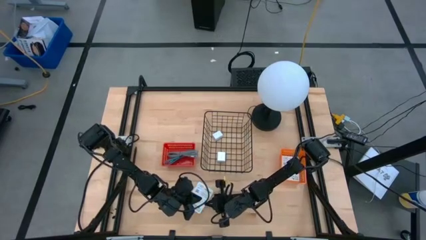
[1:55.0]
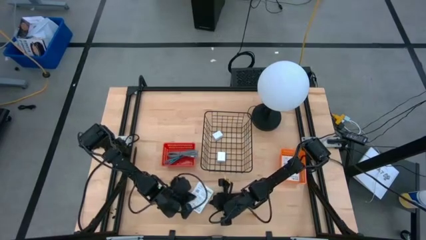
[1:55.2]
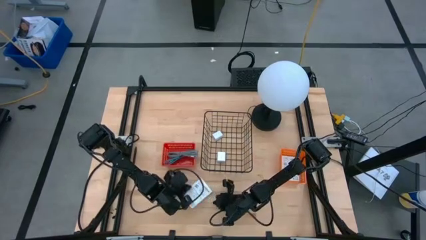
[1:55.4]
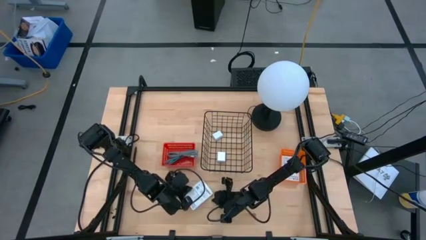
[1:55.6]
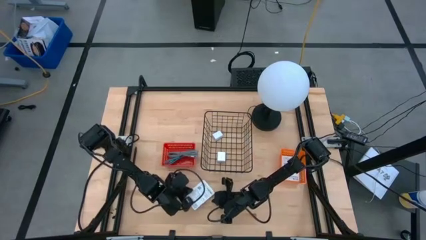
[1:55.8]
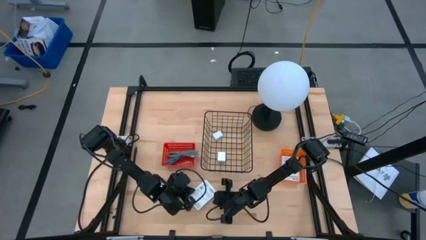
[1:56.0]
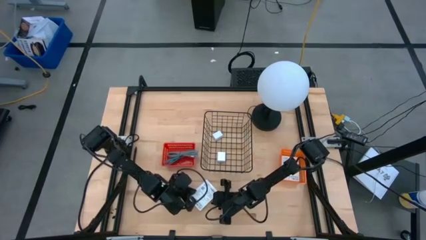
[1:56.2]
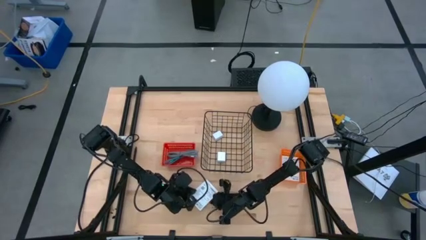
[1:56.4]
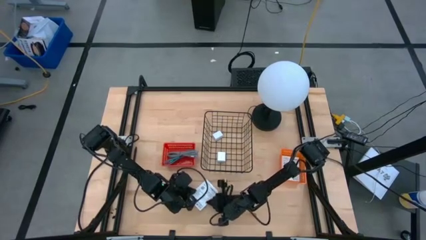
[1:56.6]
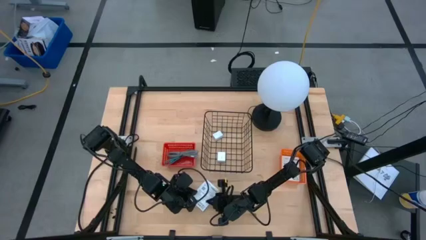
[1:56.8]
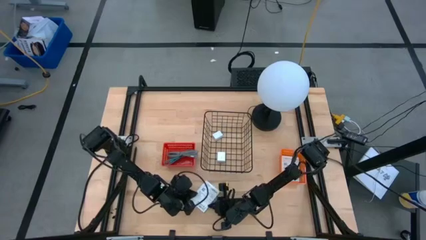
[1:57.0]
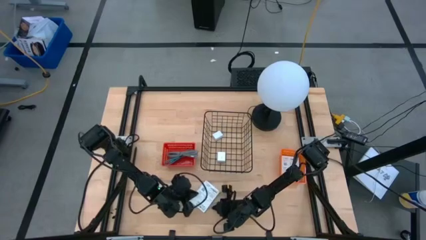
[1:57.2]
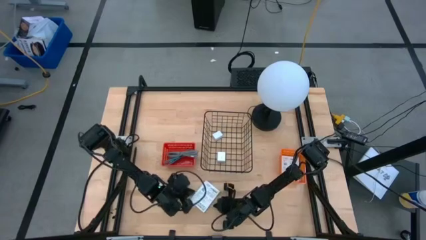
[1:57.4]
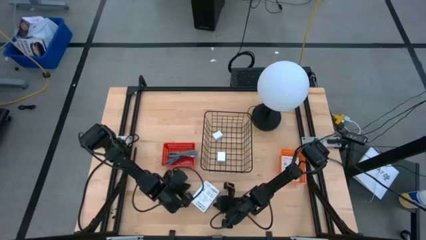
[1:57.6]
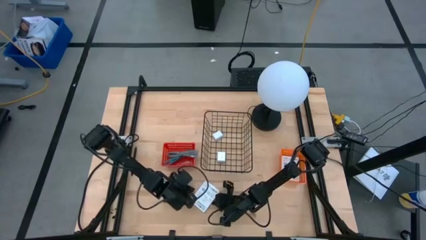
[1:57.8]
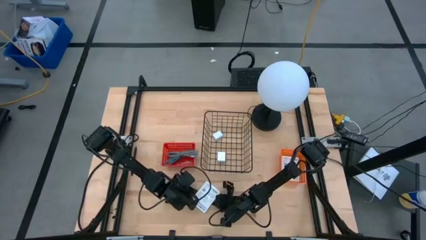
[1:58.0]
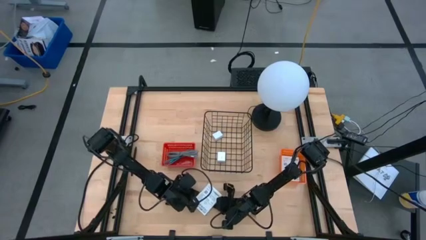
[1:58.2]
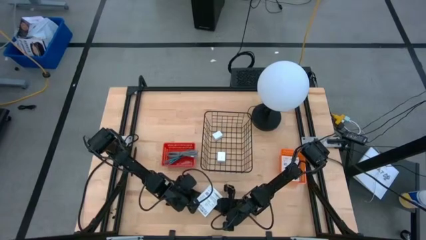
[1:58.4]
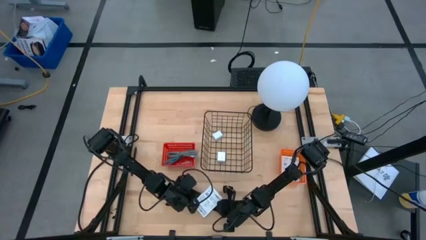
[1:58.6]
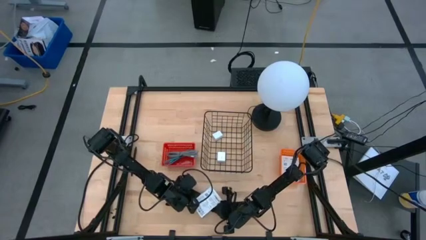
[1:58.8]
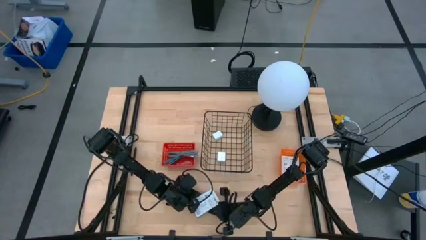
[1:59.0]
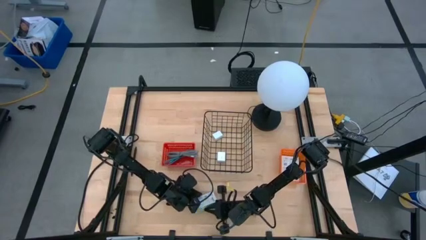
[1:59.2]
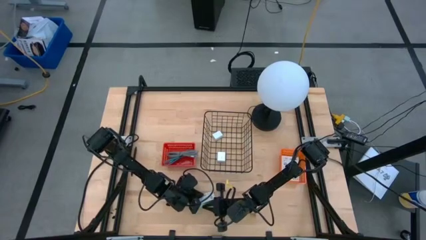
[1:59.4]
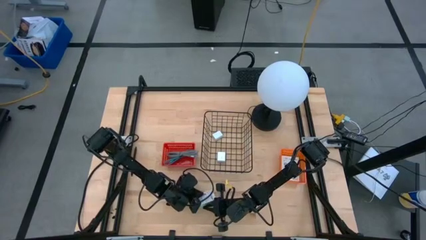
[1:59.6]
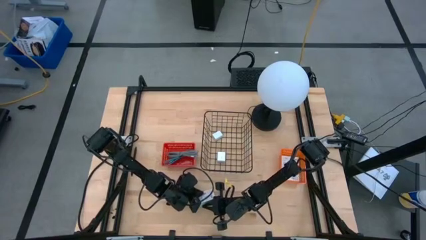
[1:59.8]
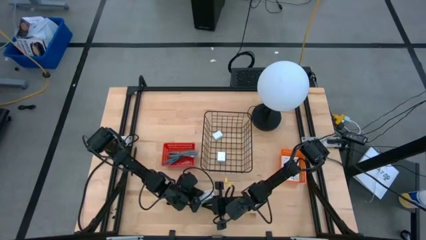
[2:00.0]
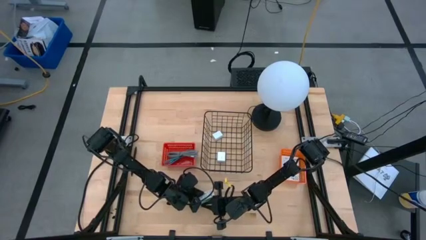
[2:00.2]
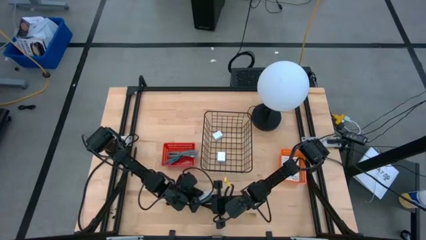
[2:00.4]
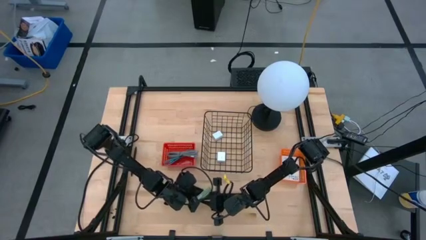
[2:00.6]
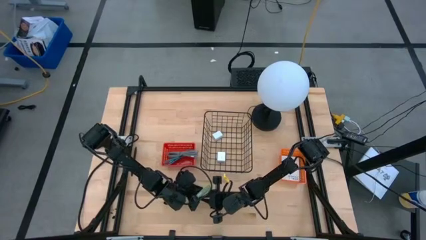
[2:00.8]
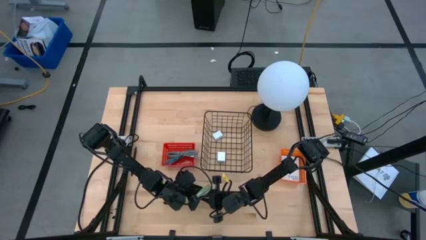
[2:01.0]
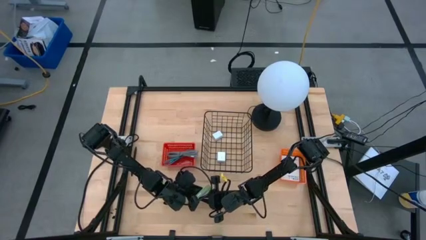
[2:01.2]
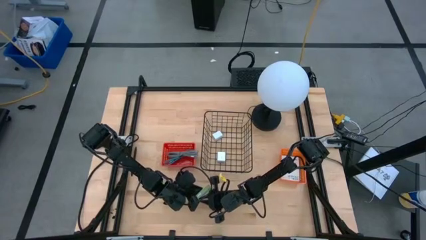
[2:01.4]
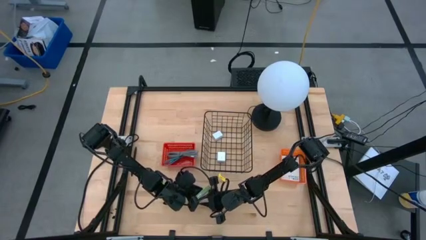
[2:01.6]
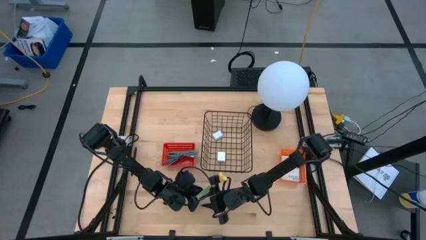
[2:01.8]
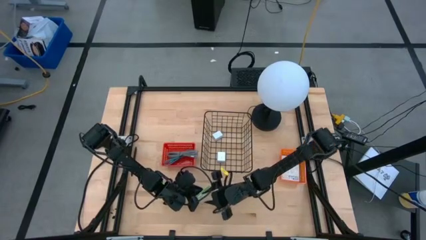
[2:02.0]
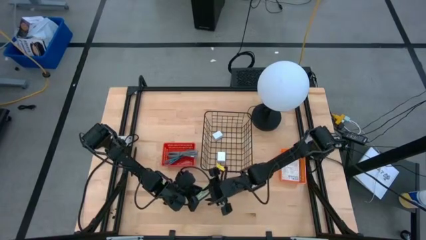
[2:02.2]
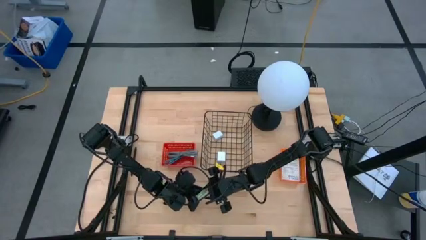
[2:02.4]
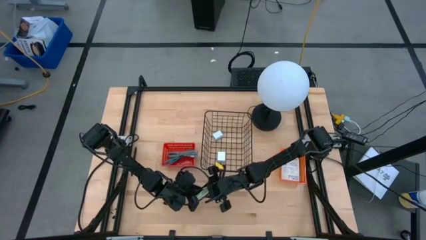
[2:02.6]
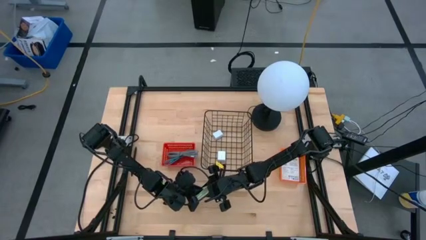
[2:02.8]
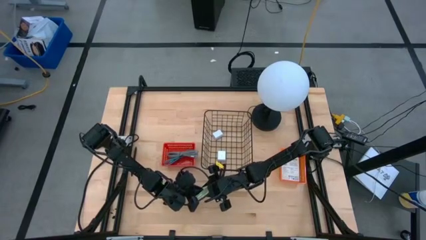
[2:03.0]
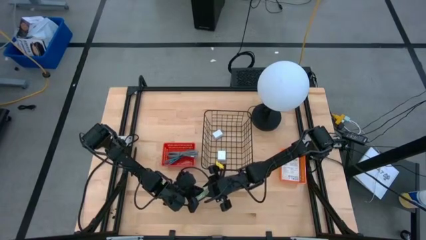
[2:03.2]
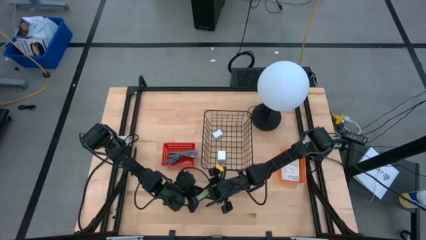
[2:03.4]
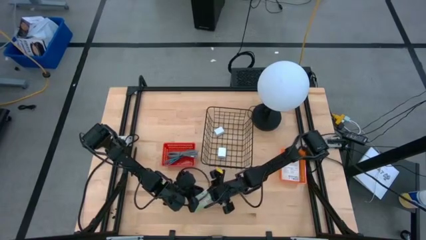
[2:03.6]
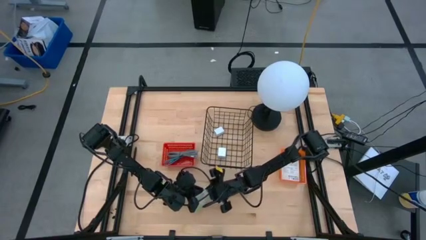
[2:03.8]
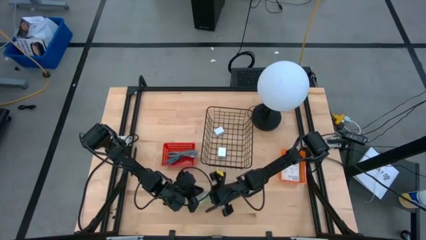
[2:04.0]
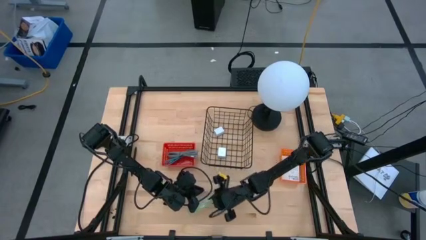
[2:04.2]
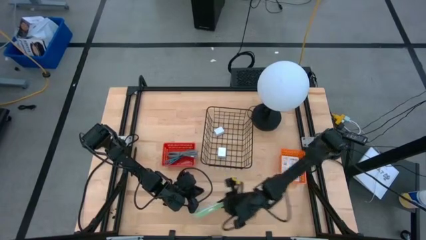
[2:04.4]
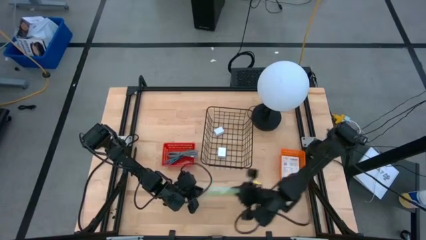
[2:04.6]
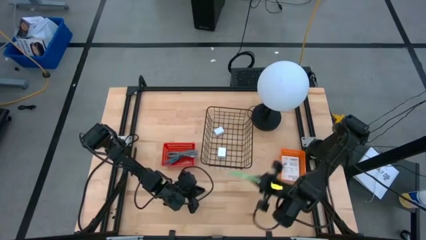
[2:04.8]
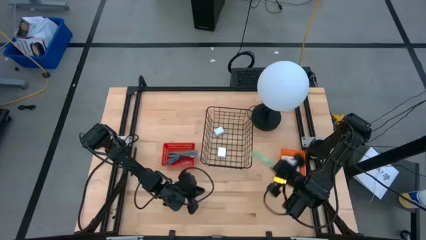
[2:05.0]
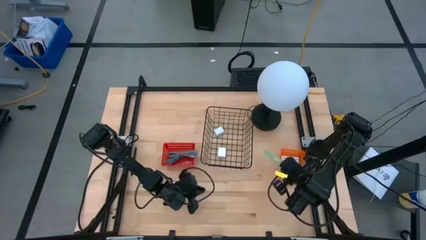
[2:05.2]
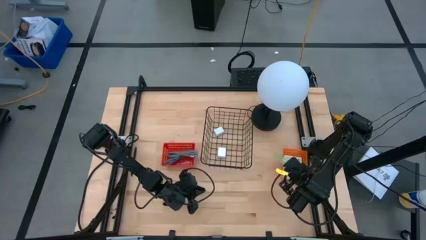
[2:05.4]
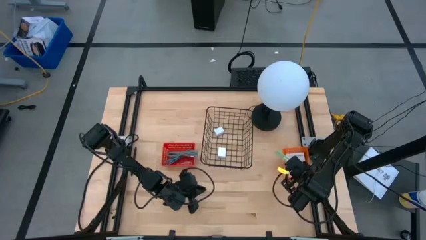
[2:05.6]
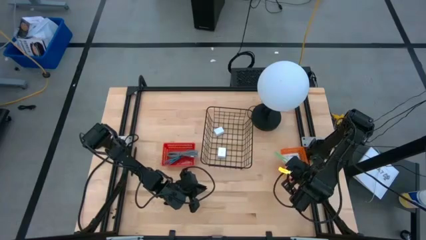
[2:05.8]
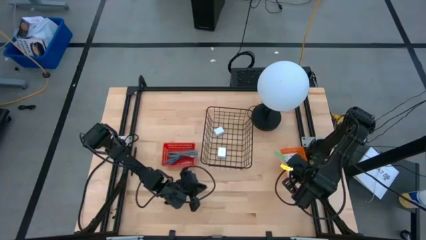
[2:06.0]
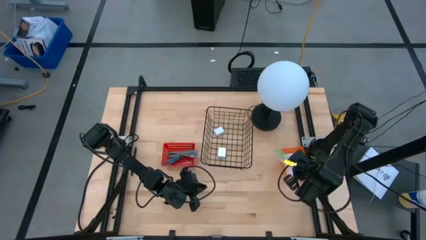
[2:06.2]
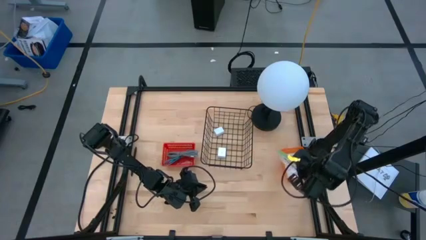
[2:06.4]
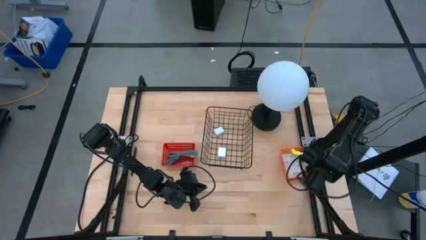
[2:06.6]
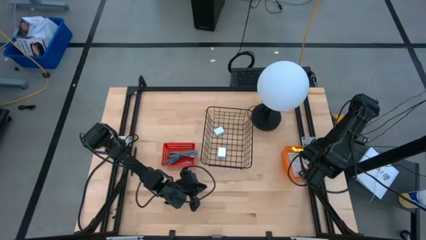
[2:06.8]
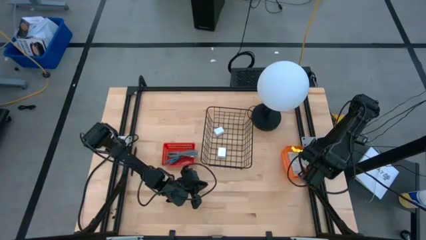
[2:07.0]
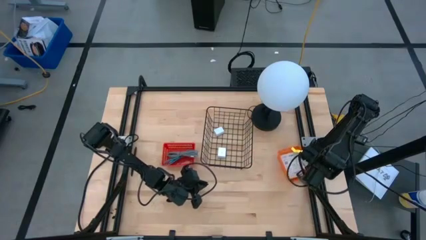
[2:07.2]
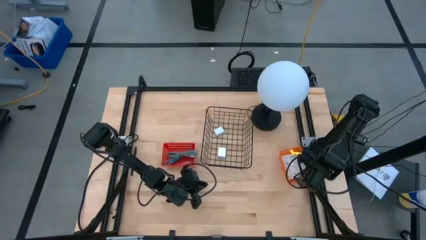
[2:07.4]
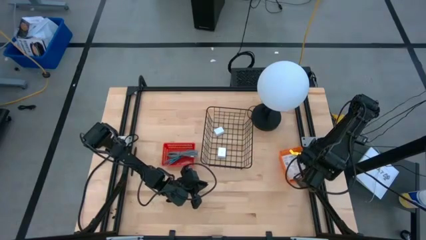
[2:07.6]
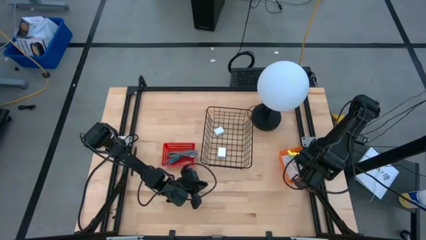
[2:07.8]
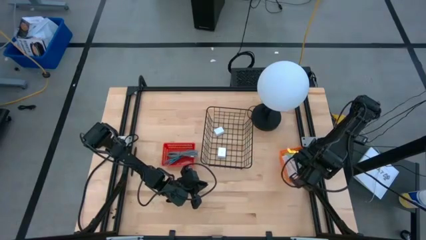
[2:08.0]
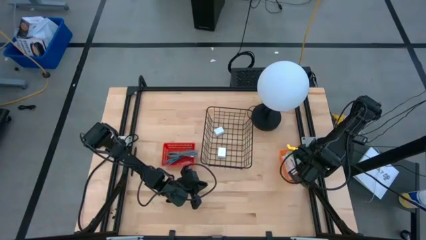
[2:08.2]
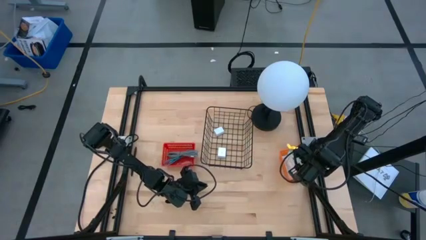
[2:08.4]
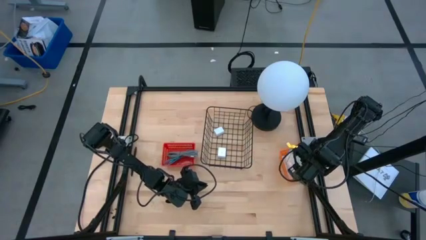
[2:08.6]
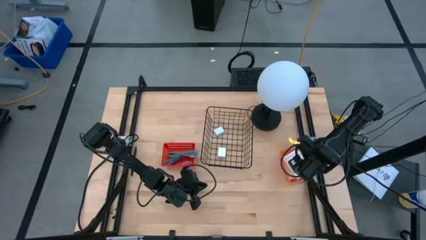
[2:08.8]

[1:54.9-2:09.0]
Task: Pick and place items into bin
Put the card reader box into the orange basket
